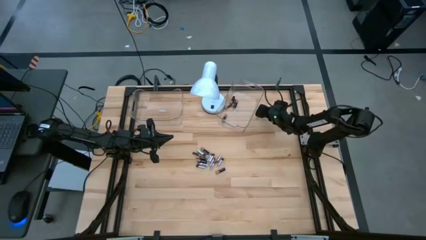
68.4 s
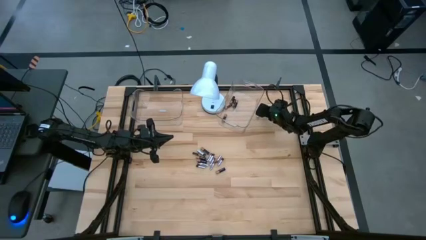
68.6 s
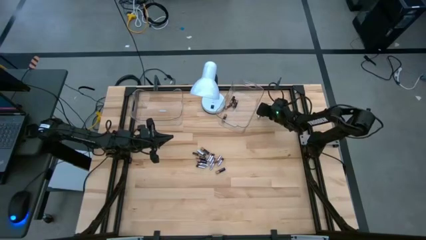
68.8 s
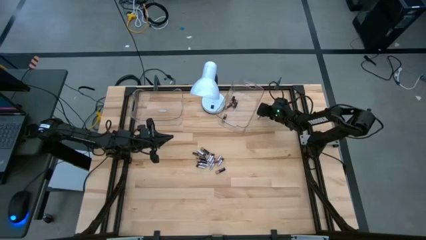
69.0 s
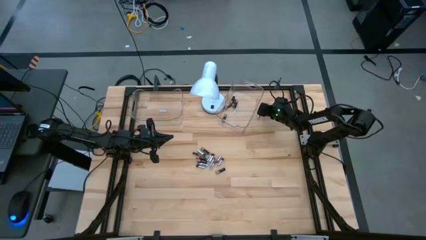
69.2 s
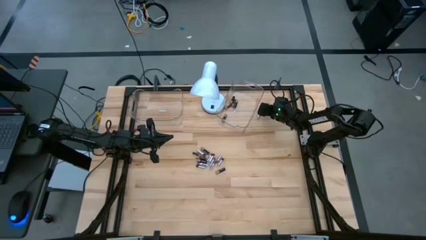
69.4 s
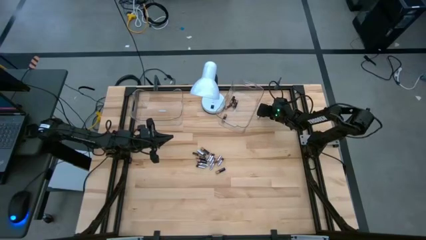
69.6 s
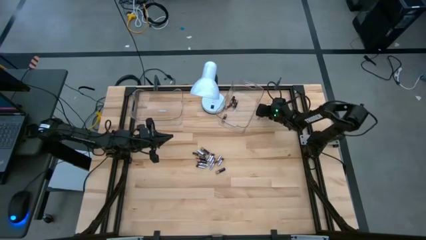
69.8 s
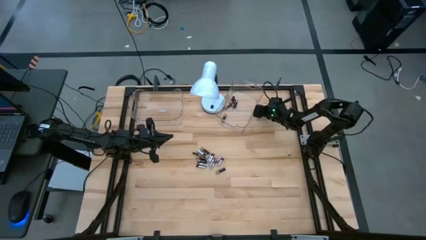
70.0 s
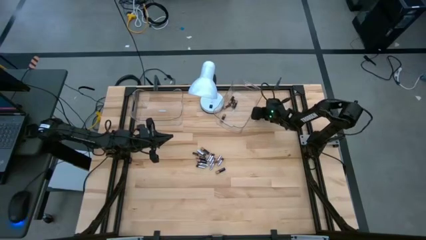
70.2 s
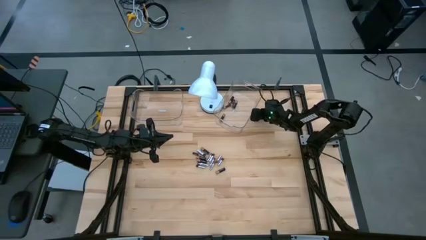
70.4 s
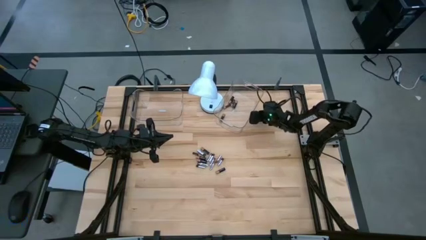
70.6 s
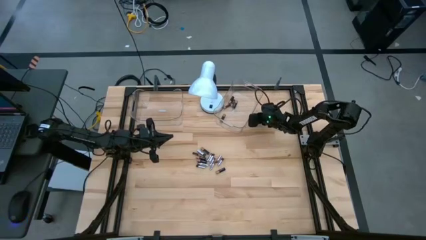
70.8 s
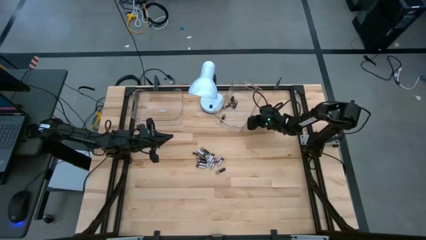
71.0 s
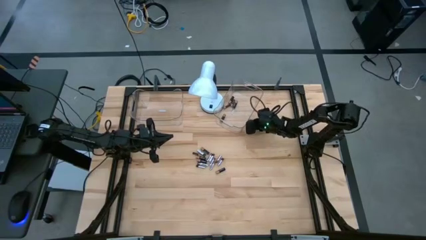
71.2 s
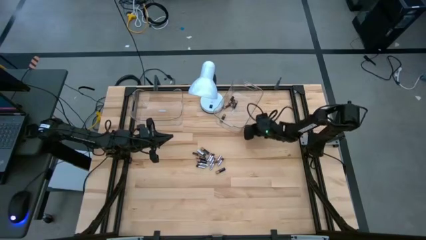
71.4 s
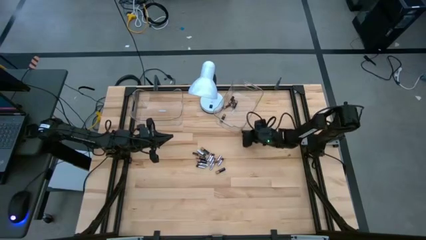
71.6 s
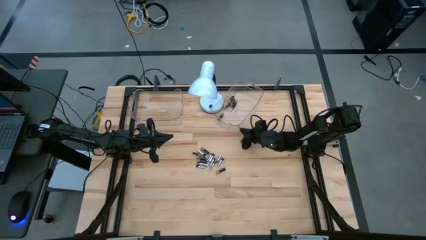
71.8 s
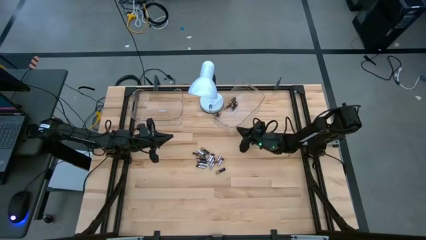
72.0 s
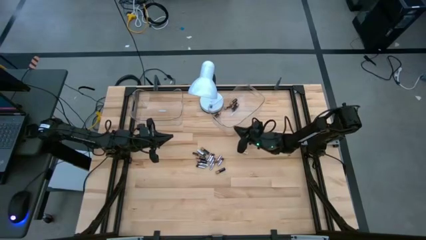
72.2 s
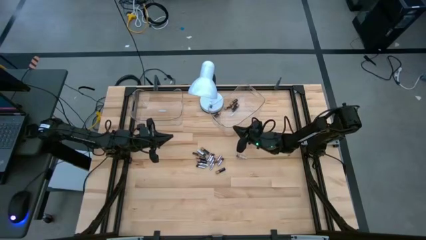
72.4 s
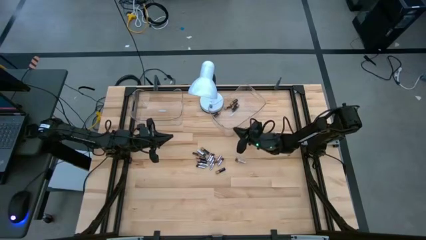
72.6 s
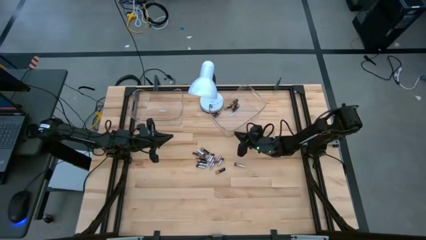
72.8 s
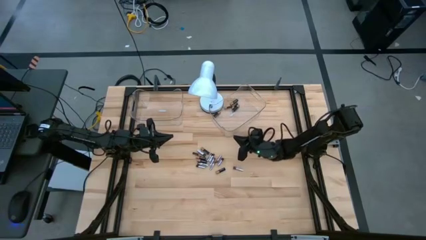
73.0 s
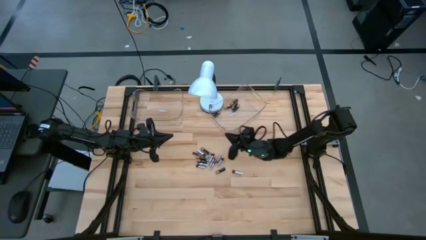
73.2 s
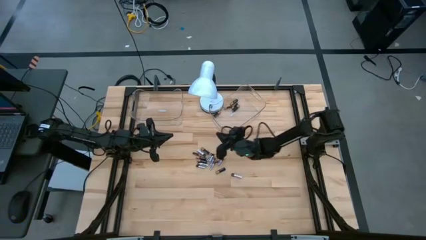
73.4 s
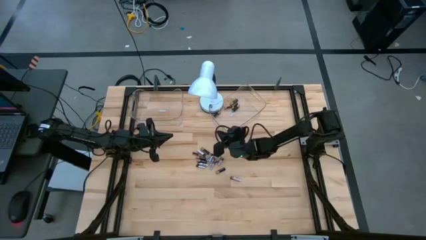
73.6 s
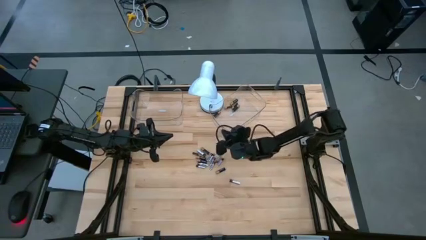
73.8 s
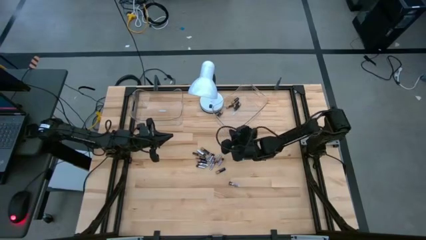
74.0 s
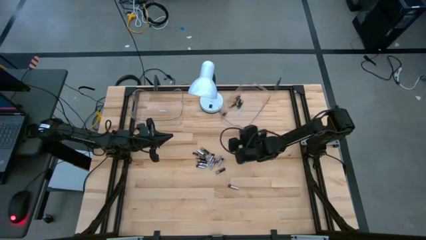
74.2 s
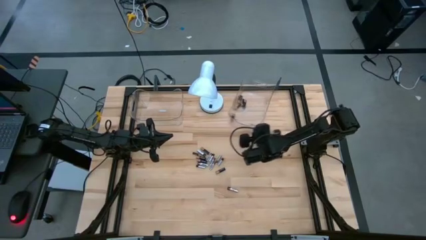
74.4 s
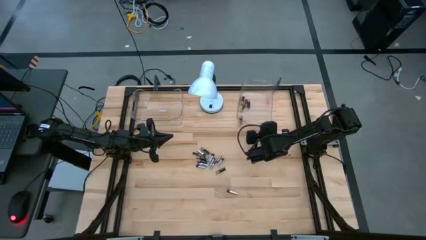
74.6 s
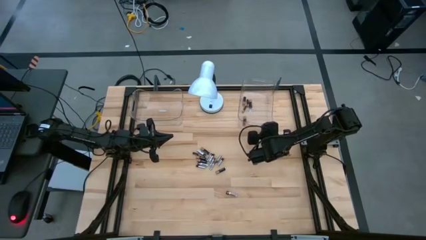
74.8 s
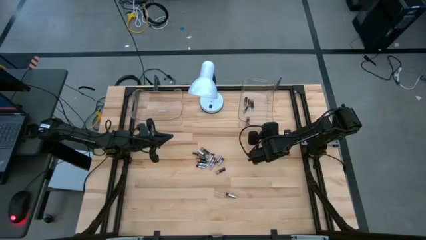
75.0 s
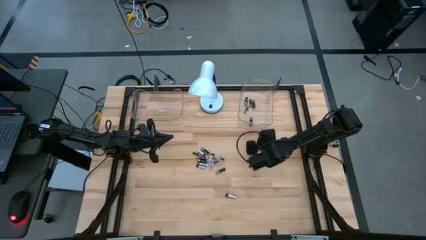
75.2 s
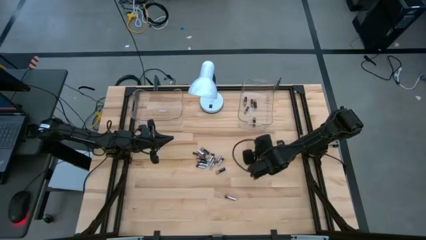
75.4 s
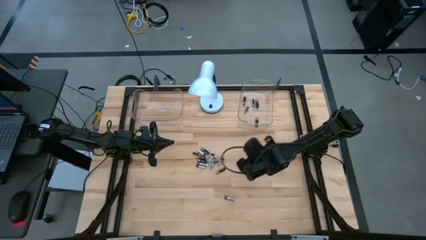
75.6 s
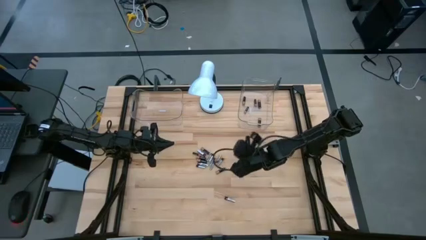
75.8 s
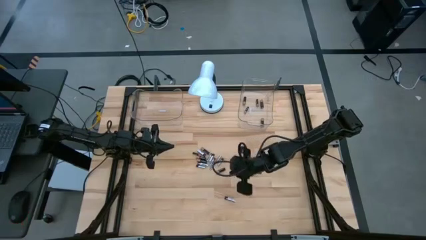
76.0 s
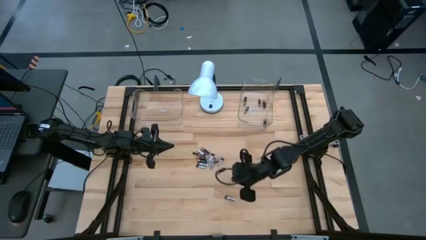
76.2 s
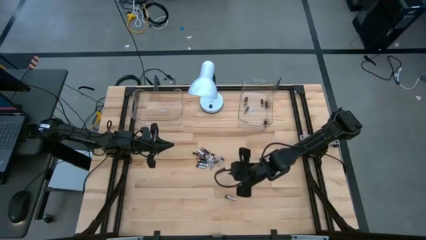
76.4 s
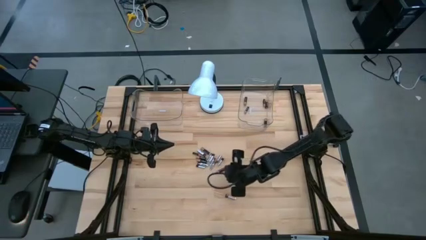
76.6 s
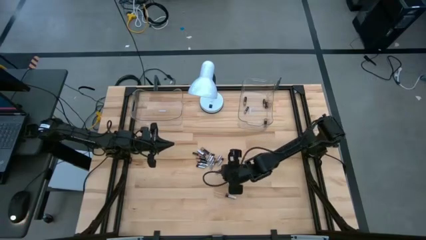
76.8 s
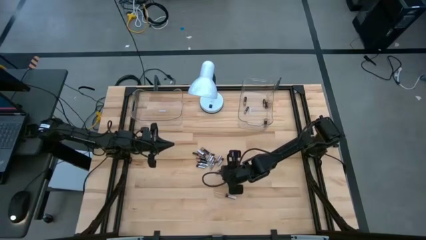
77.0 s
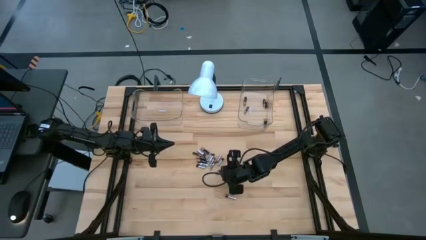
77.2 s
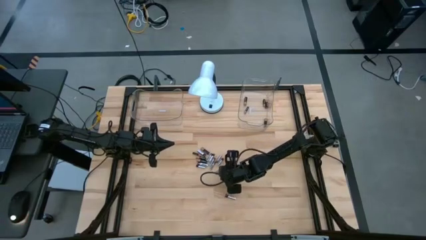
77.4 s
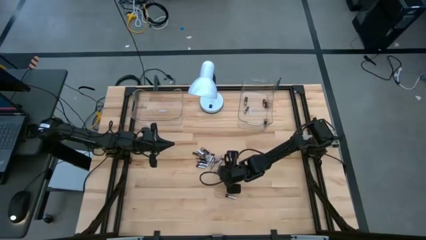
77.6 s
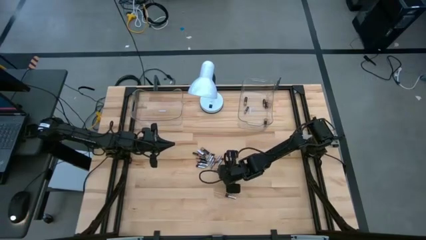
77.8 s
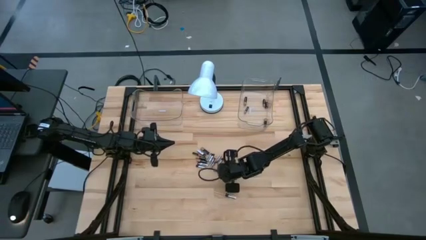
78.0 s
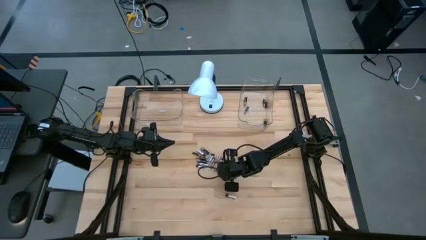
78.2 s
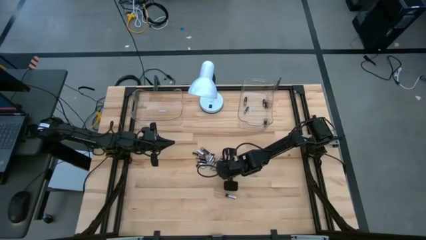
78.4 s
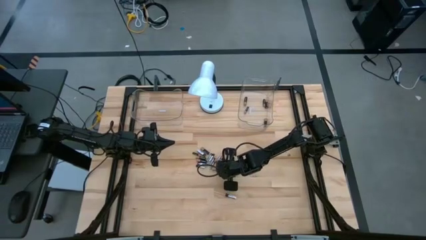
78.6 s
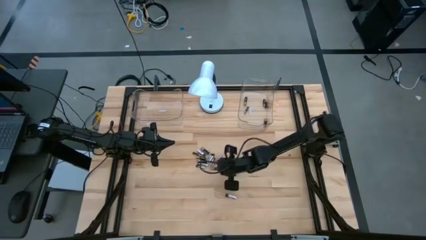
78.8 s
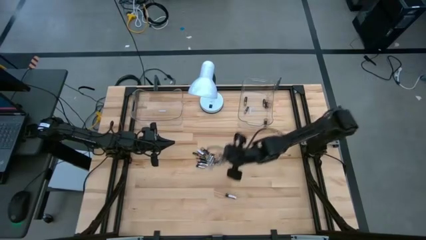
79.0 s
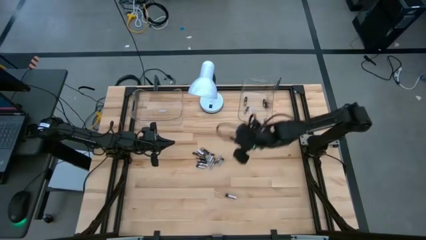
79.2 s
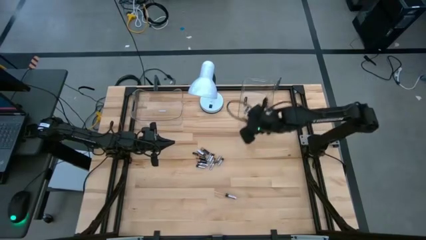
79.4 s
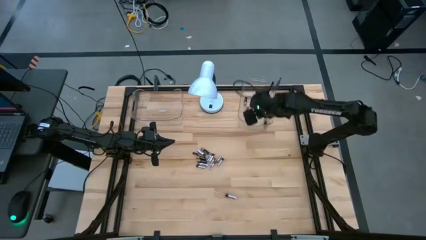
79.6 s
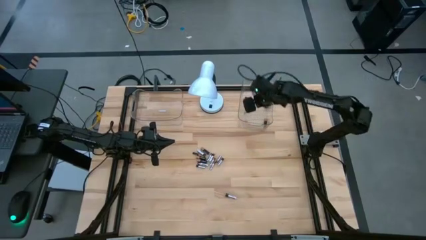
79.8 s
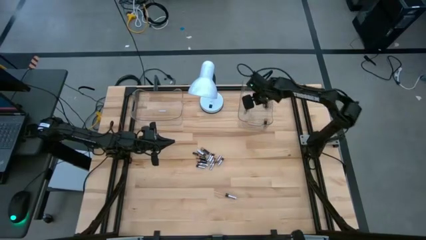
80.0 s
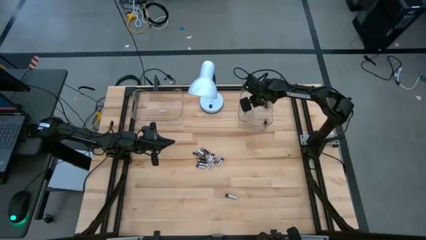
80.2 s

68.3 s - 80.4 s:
Task: Sort batteries
Put the black battery in the transparent bin

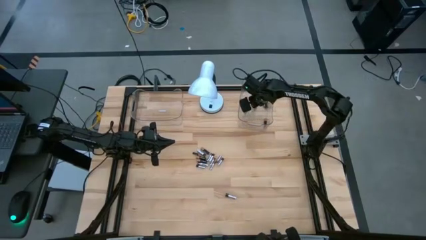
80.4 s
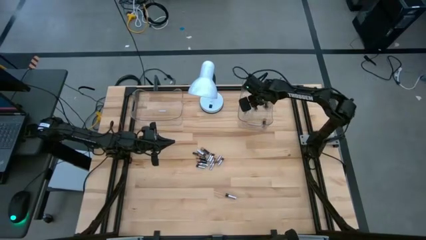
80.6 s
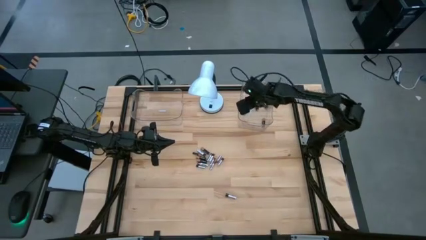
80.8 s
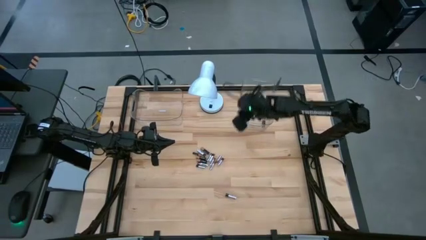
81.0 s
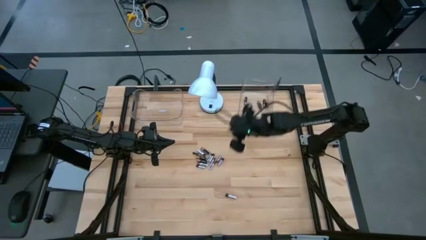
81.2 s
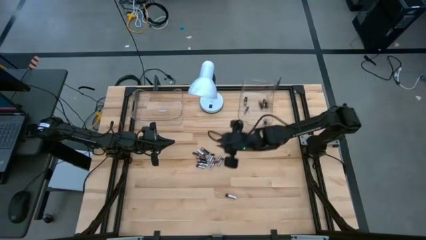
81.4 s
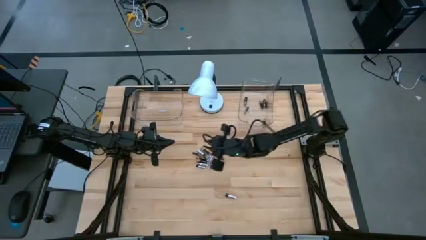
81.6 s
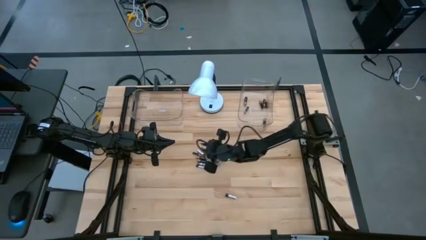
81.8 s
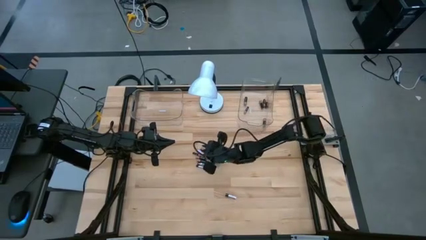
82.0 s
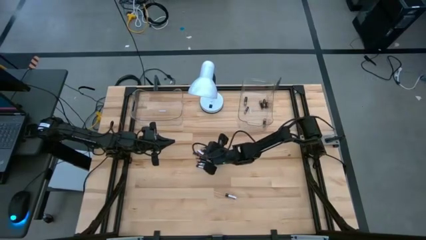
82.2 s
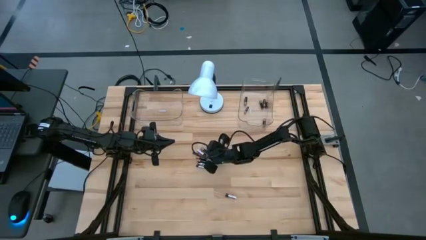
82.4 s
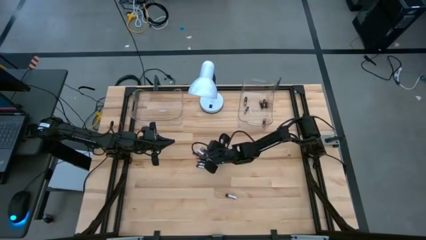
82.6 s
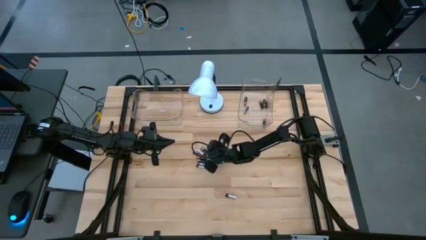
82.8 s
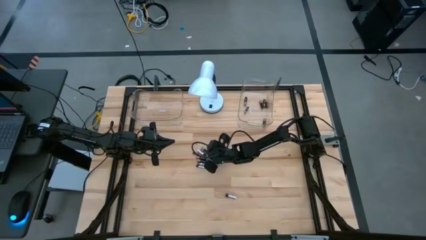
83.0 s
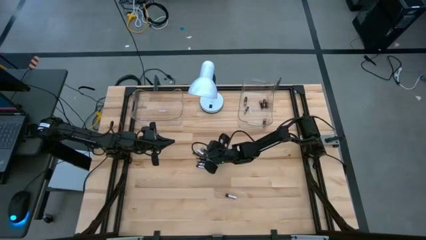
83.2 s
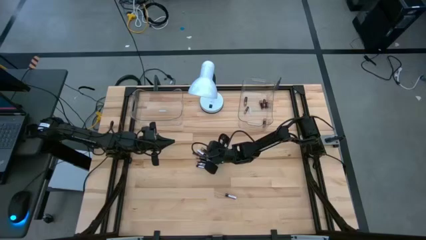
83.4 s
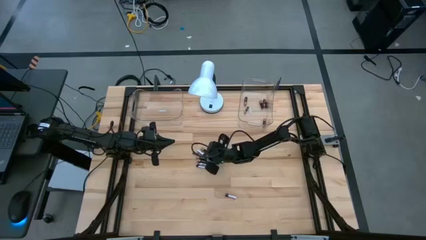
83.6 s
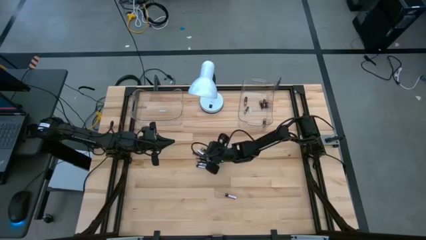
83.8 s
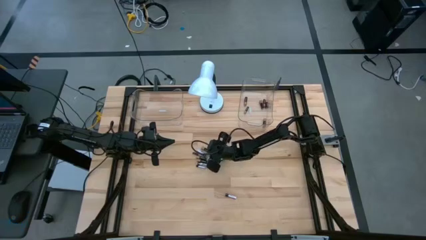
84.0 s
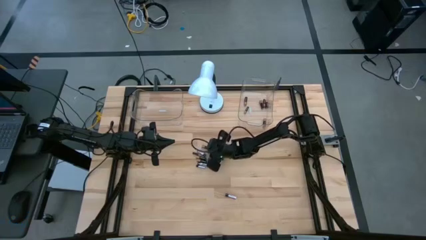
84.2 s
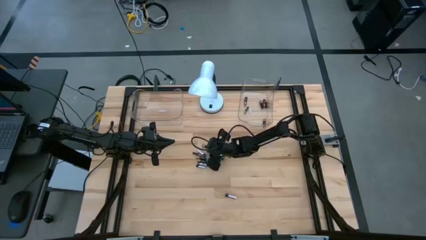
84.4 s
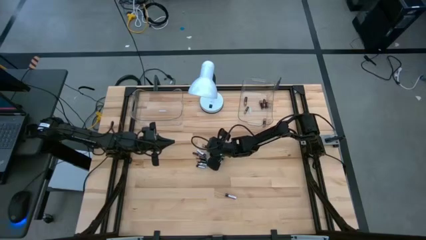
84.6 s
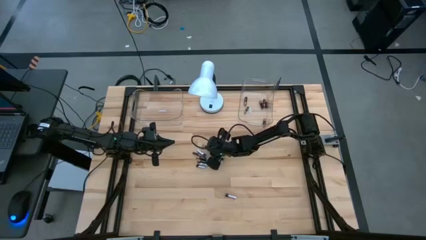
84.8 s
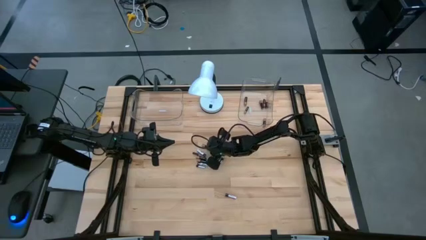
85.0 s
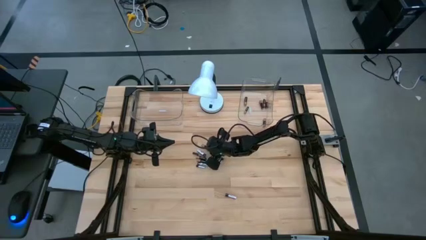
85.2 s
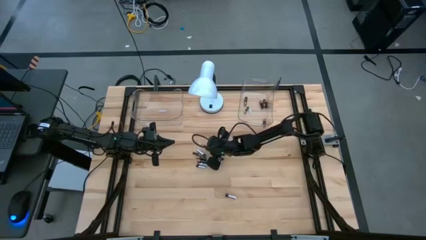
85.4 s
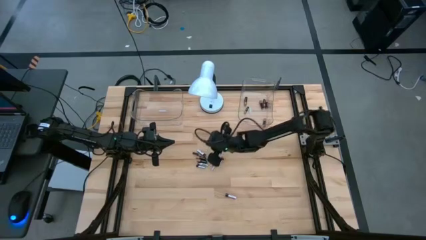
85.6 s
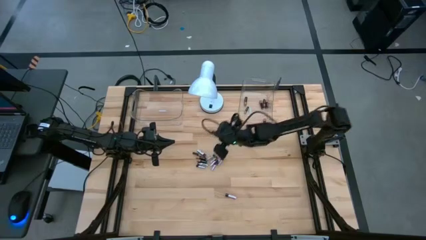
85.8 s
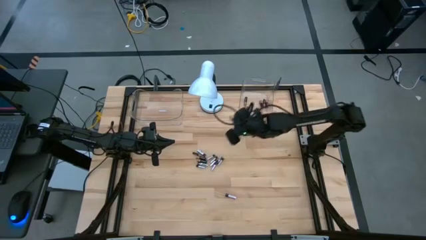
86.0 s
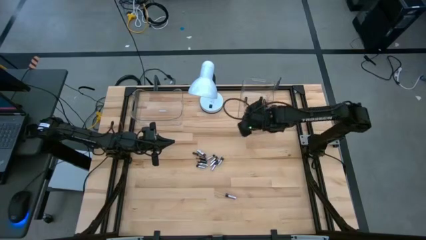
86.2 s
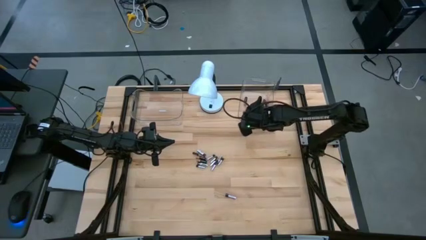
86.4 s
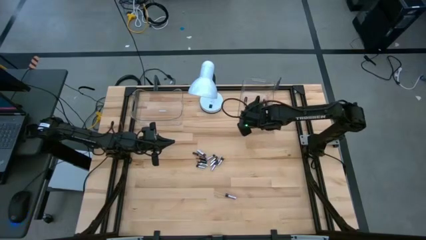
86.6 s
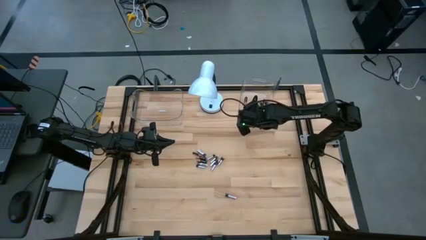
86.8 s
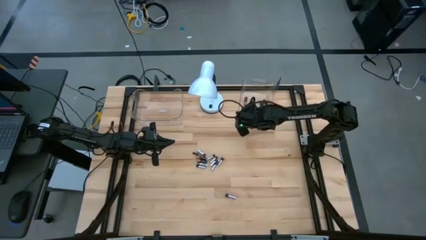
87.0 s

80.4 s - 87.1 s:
Put the black battery in the transparent bin
